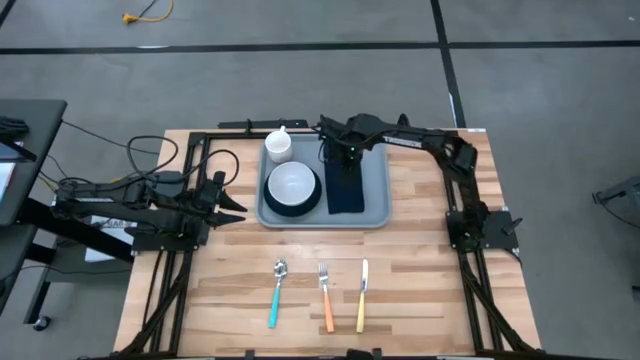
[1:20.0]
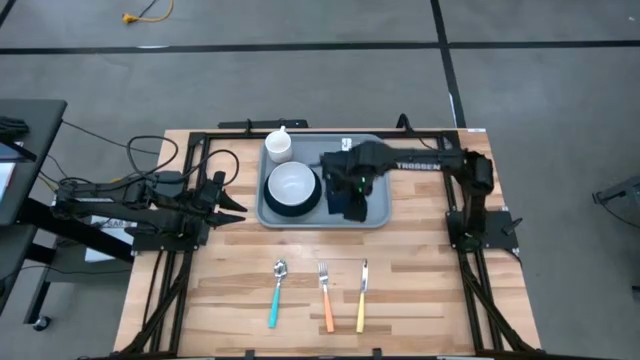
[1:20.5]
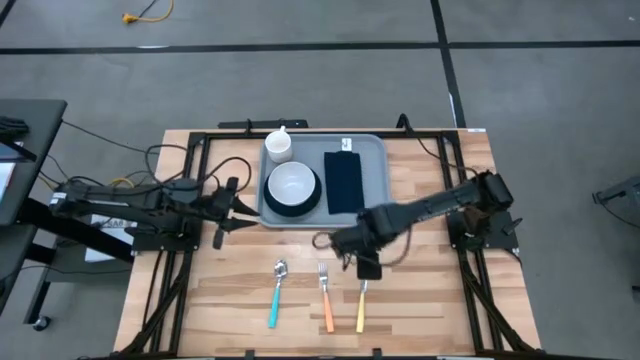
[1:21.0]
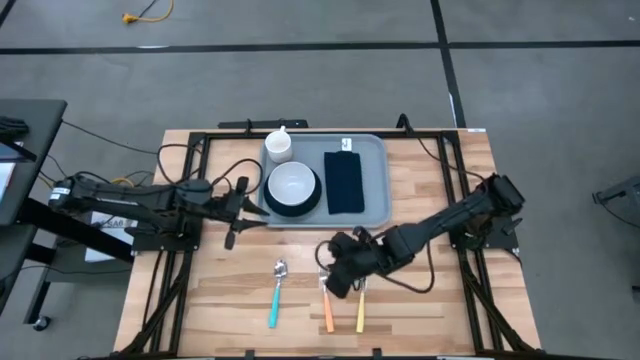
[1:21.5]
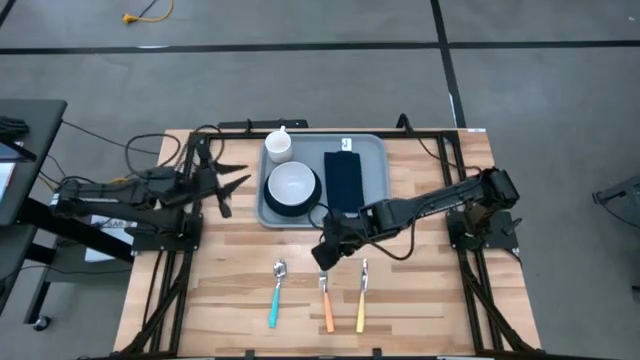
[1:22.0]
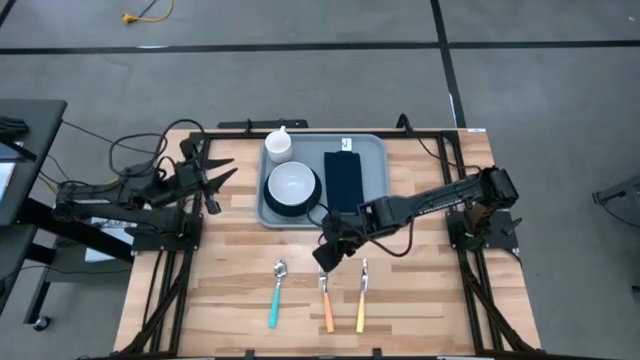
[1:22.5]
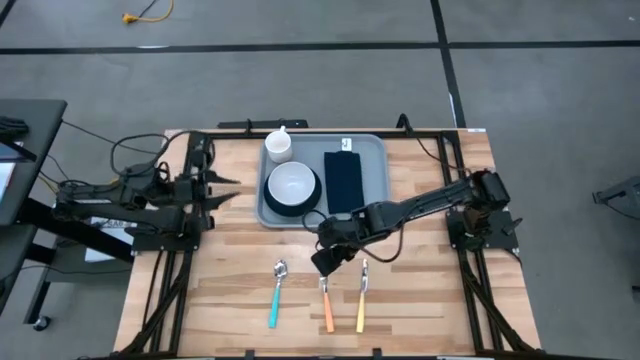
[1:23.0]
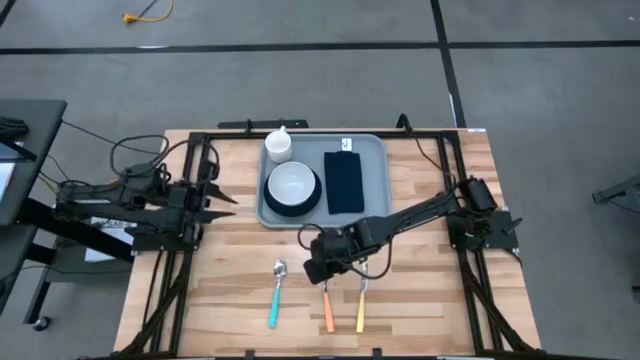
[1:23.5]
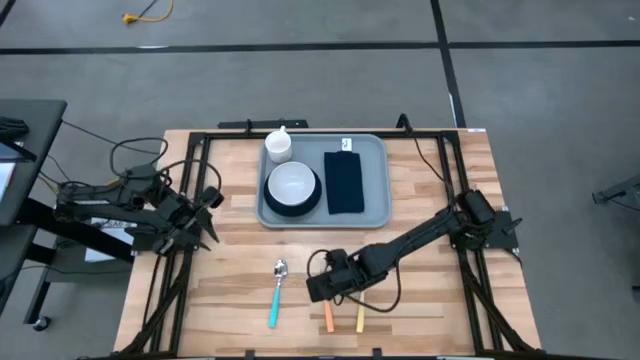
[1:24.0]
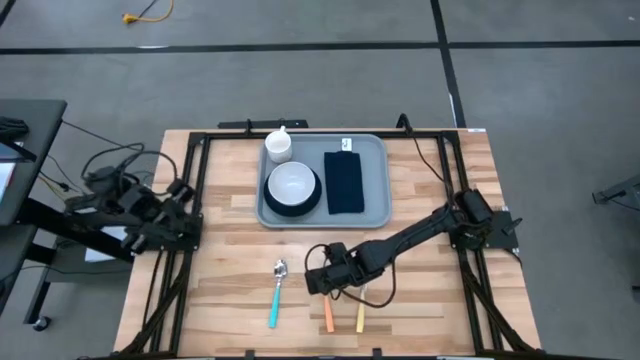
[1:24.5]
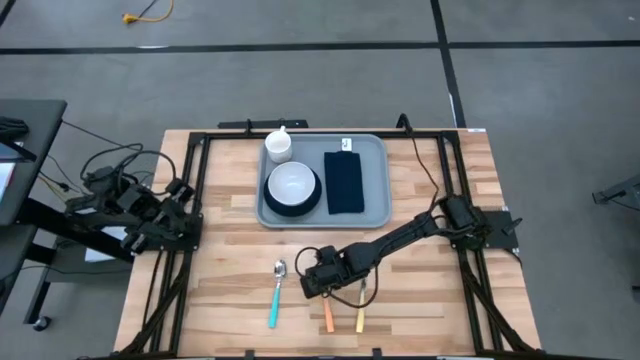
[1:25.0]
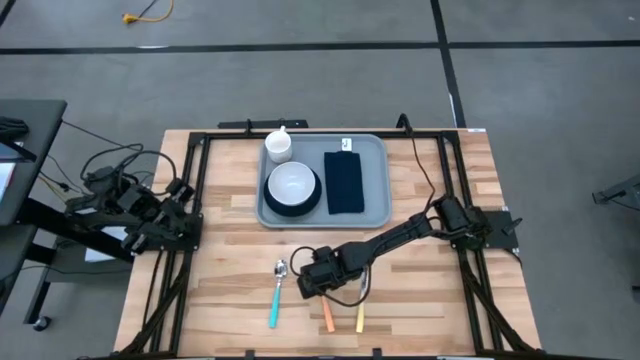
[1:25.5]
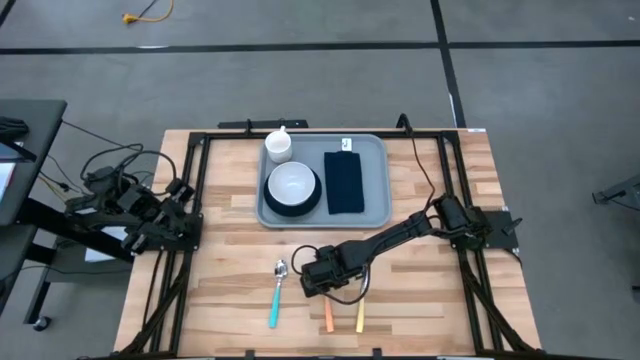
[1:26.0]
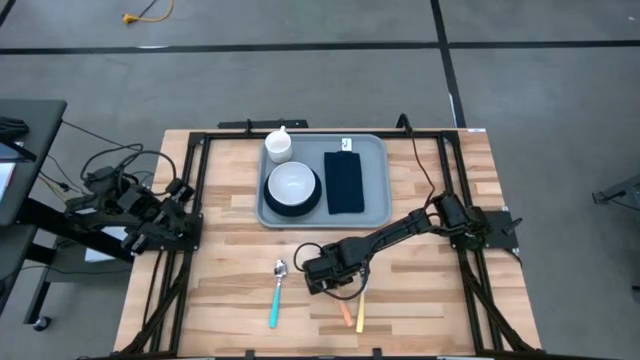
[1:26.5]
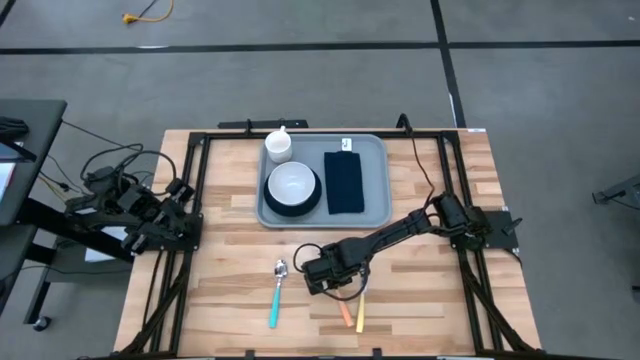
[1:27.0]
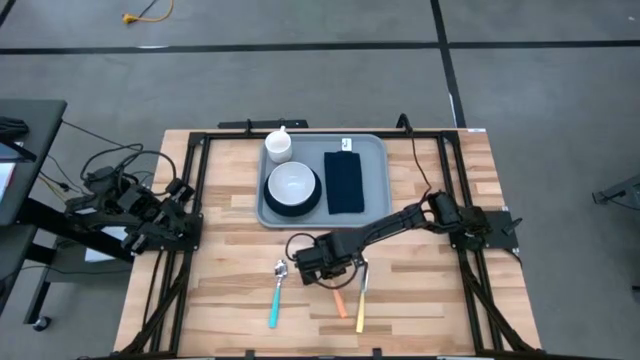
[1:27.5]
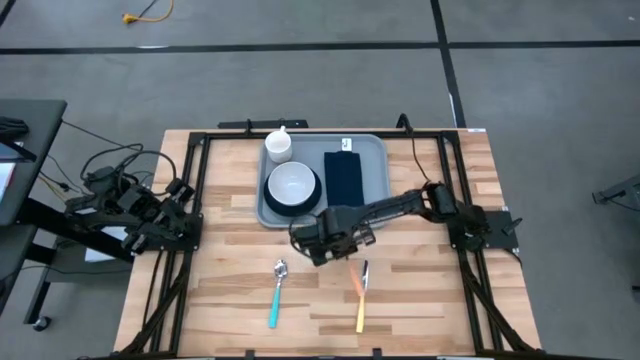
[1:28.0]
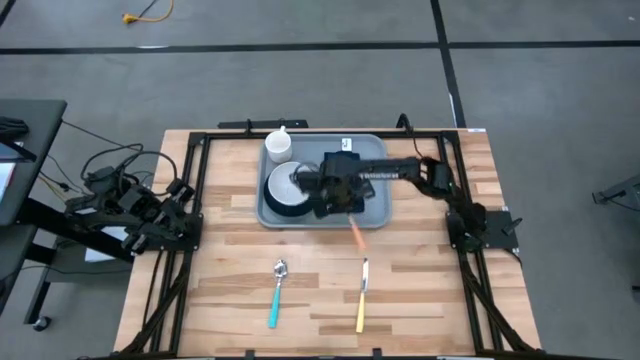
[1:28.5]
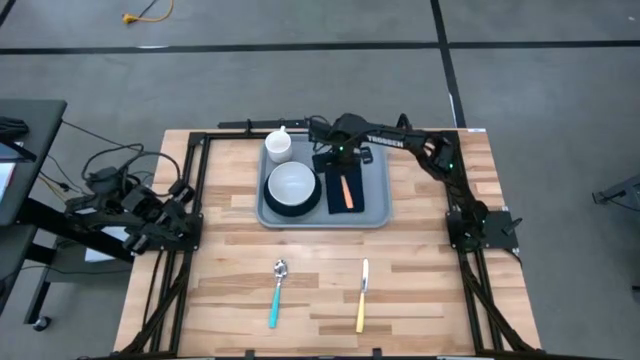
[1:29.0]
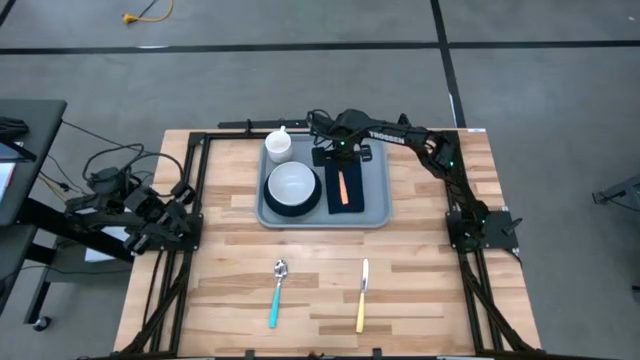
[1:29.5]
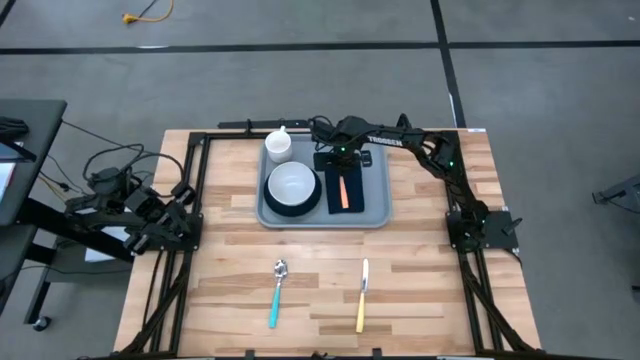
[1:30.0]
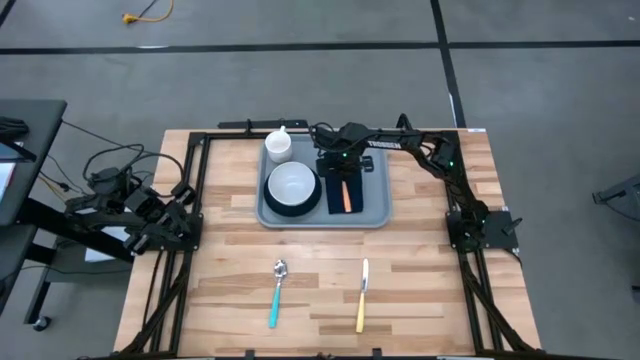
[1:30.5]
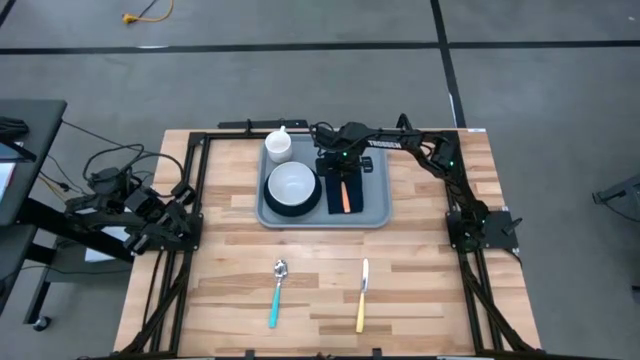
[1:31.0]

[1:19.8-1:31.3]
Task: Set up tray
Put the orange fork on the dark blue napkin

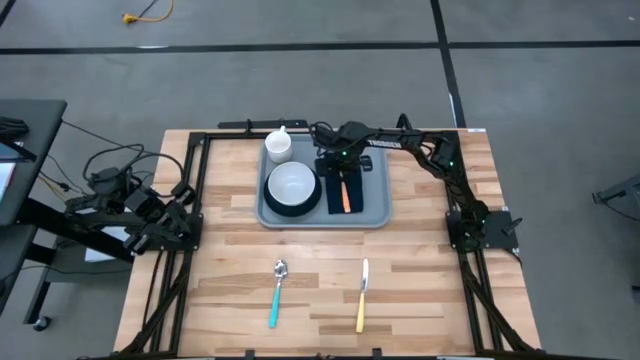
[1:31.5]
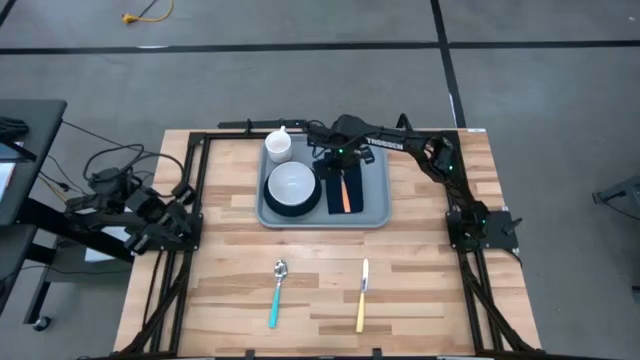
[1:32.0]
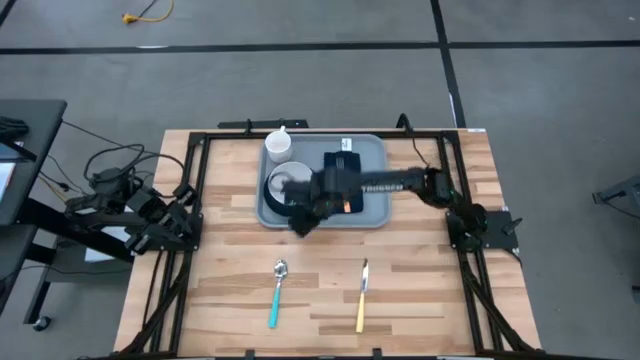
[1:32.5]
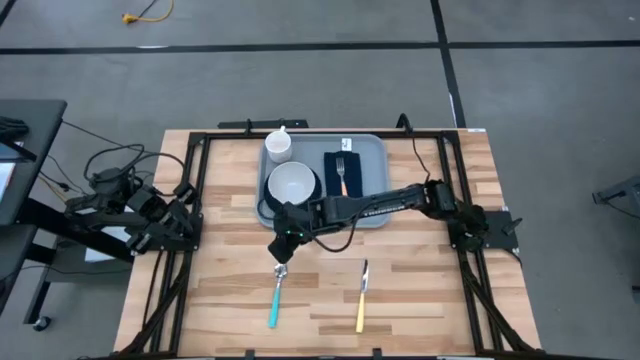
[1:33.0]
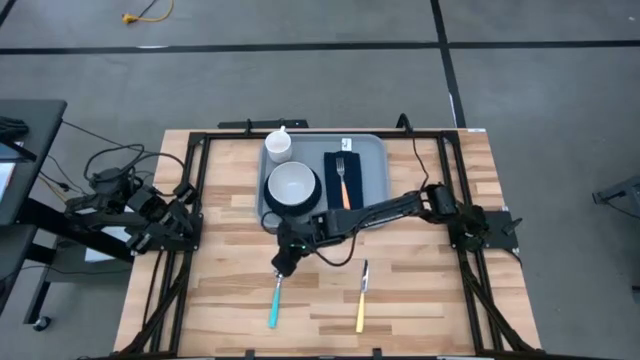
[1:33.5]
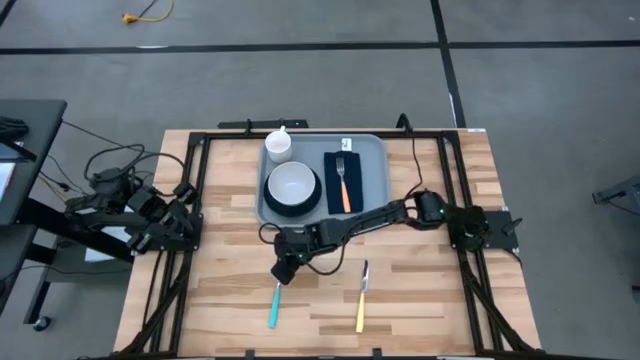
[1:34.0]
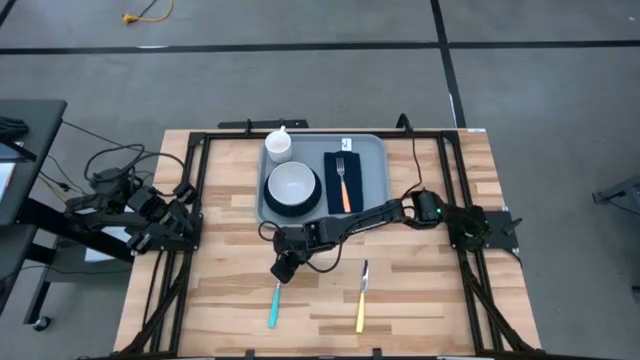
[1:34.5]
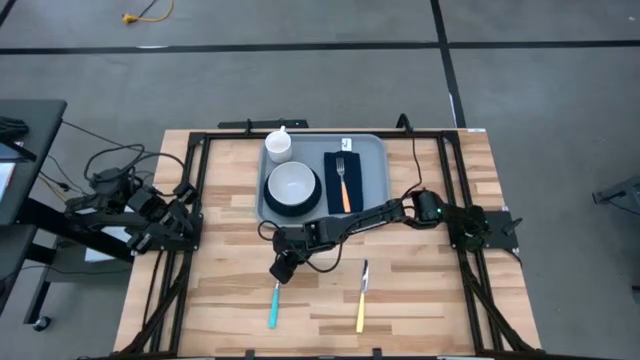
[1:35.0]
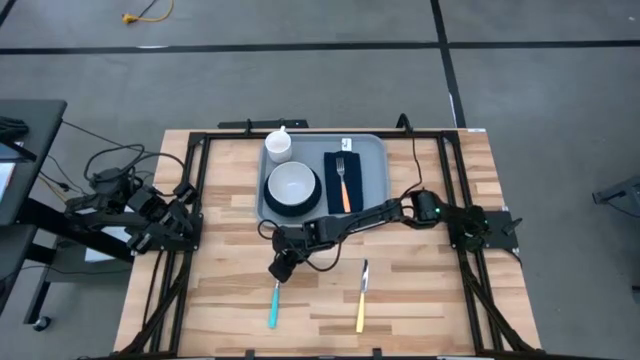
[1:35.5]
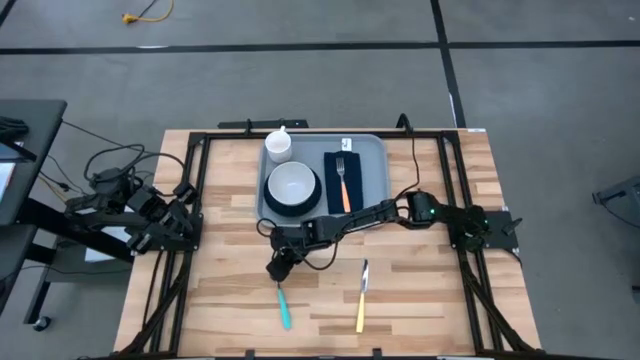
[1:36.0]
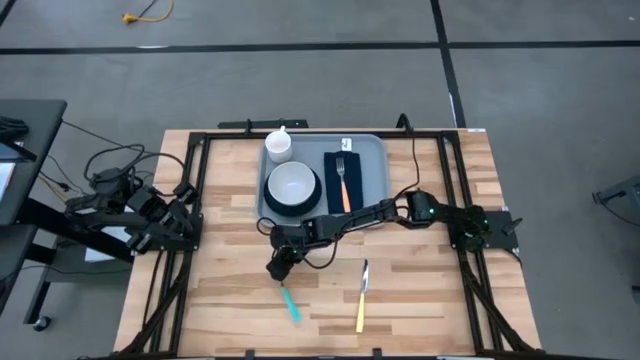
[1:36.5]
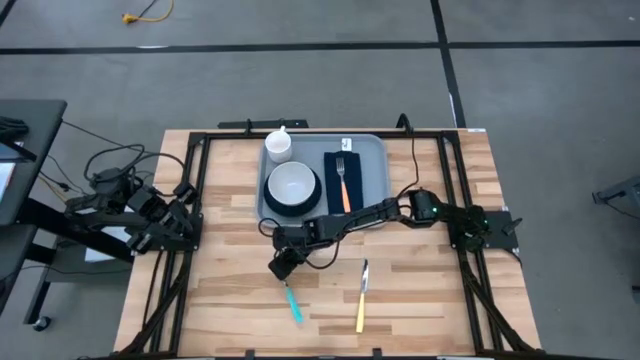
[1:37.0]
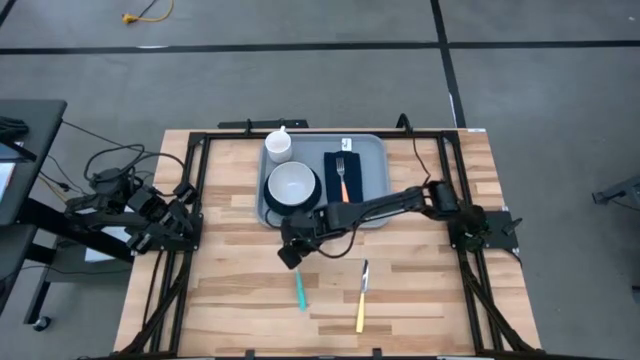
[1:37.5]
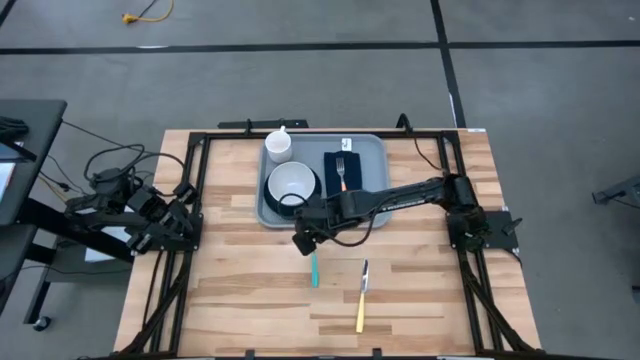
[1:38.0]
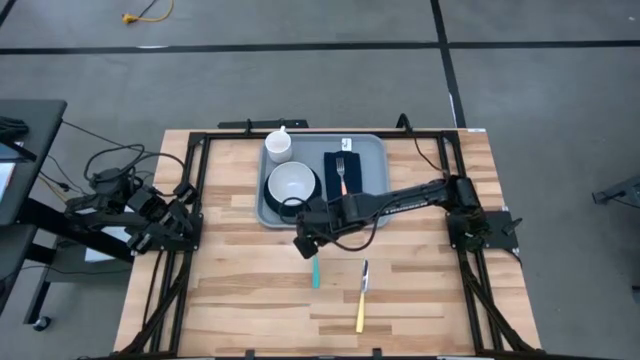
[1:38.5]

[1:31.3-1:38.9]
Put the blue spoon on the dark blue napkin to the left of the orange fork

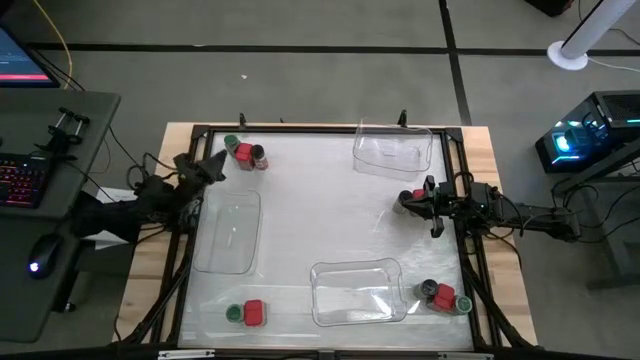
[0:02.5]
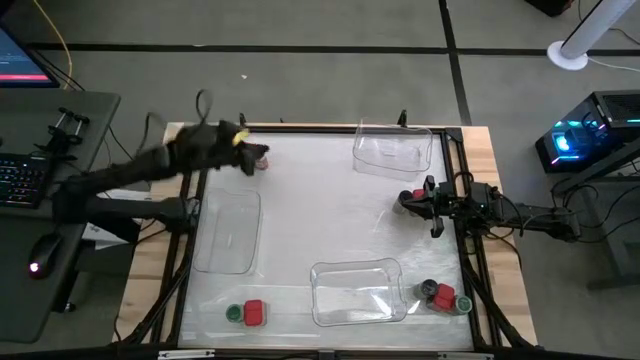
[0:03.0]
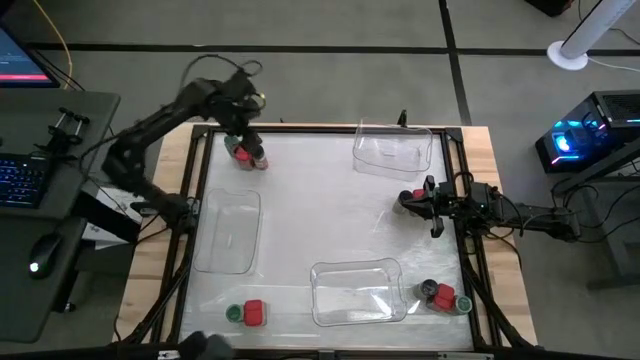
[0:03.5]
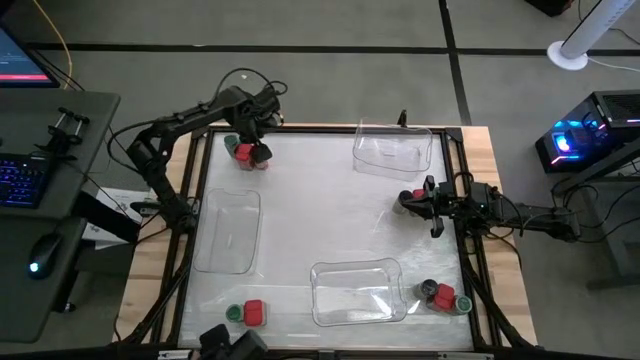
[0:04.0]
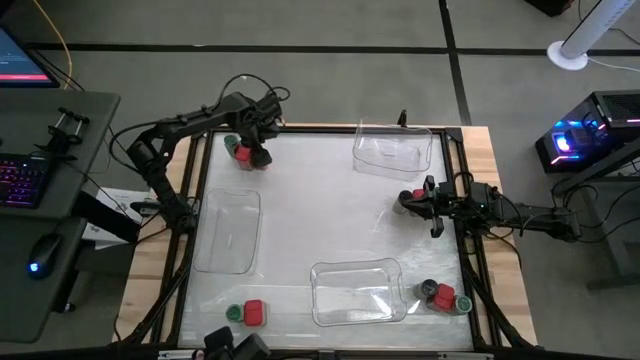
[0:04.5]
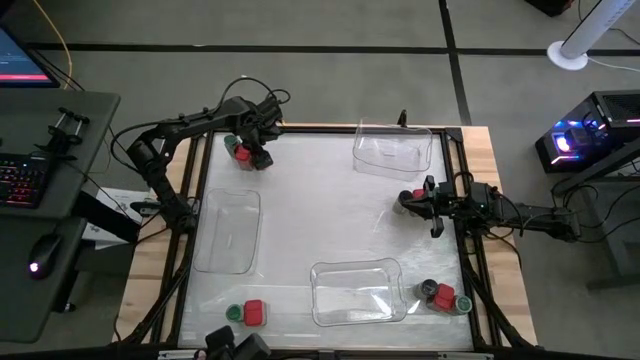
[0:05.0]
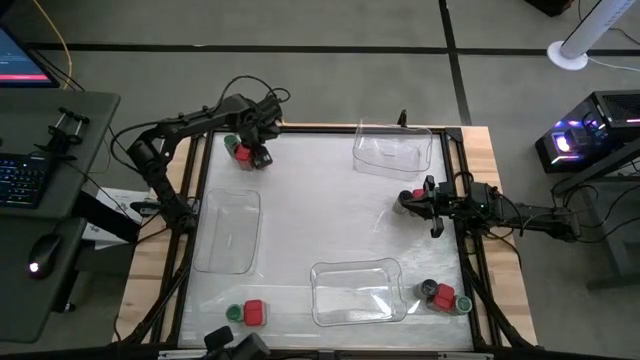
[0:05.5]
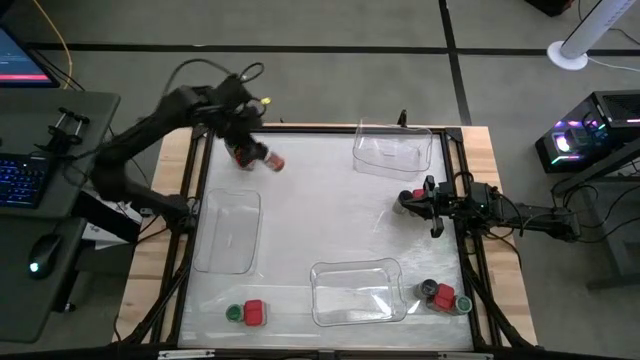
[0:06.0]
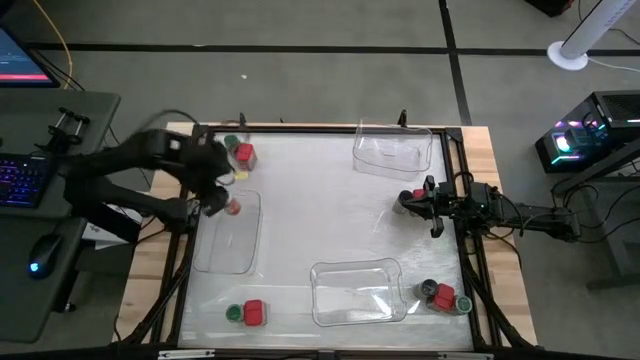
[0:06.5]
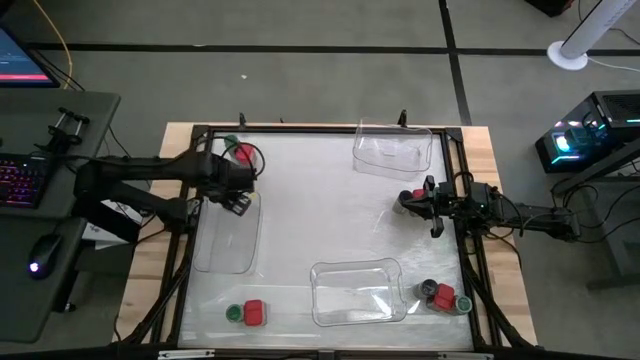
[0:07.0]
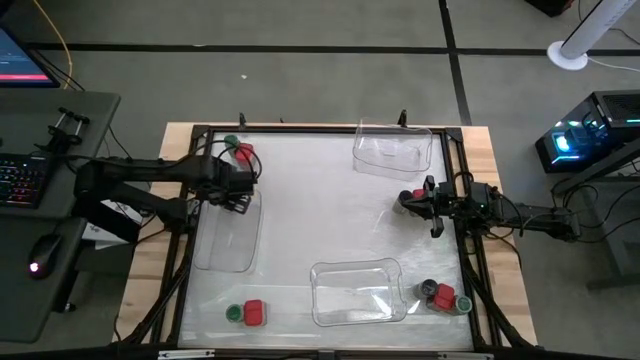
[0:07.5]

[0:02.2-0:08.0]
Task: Sort spices by type
Put the black seasoning bottle into the middle left transparent bin
